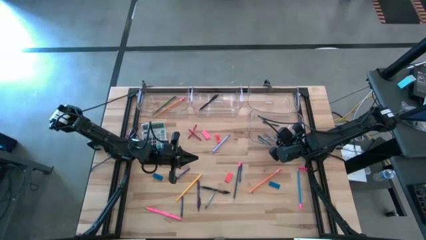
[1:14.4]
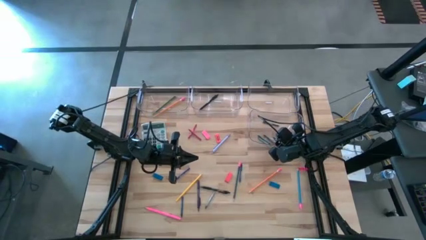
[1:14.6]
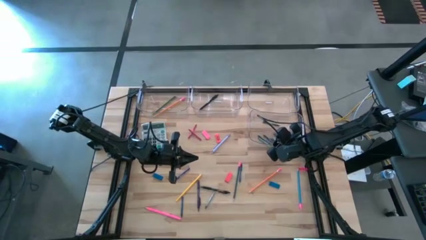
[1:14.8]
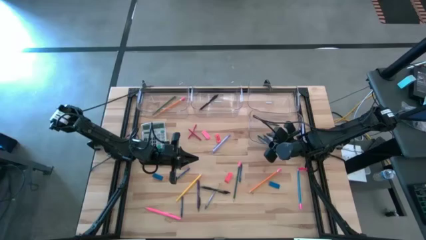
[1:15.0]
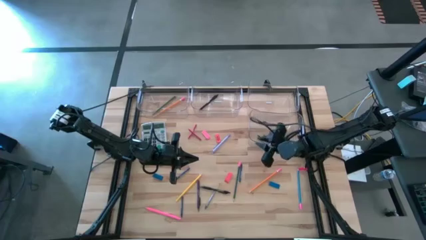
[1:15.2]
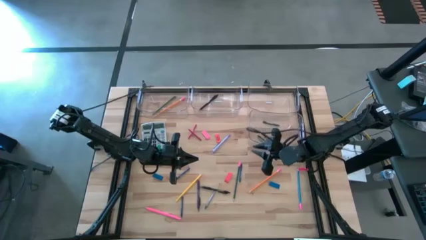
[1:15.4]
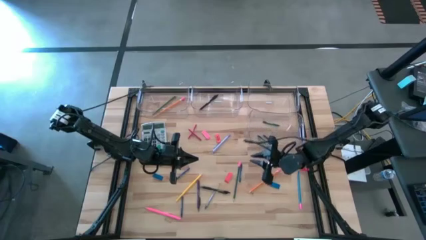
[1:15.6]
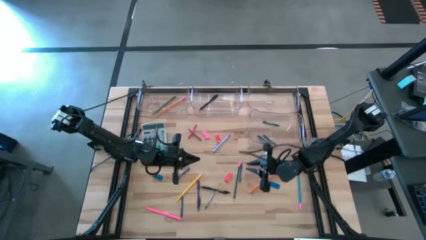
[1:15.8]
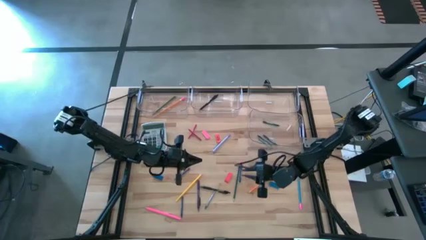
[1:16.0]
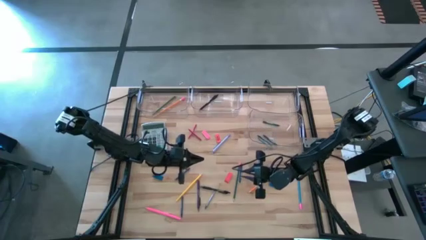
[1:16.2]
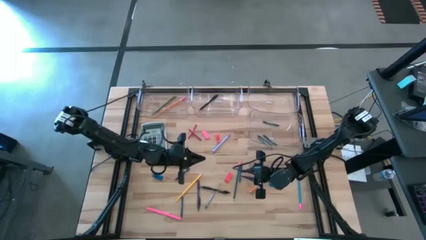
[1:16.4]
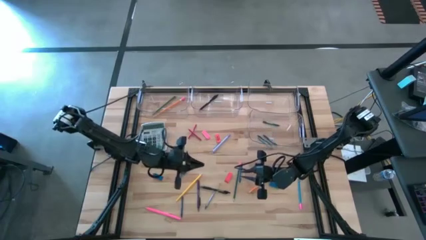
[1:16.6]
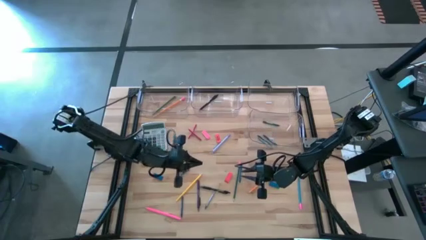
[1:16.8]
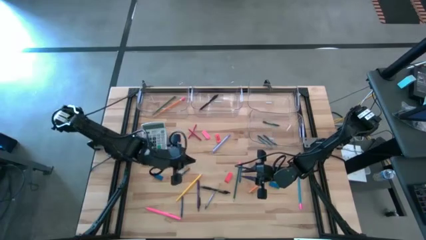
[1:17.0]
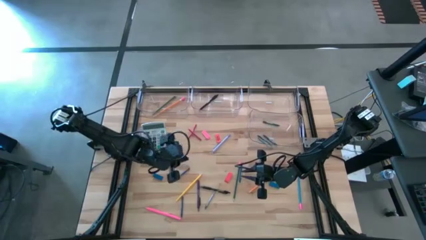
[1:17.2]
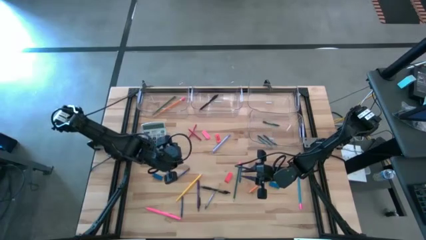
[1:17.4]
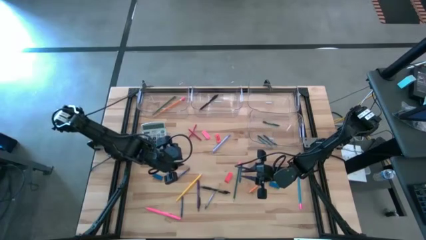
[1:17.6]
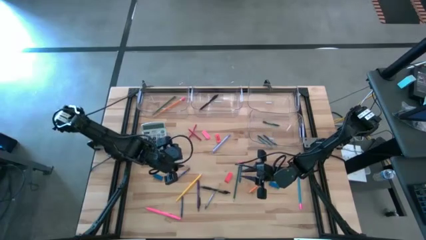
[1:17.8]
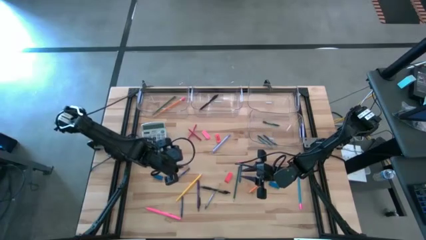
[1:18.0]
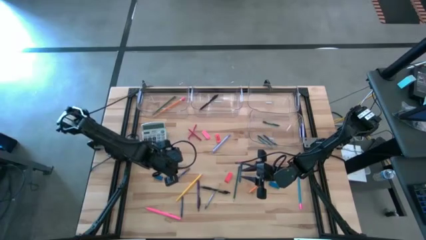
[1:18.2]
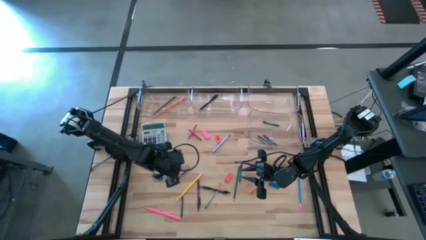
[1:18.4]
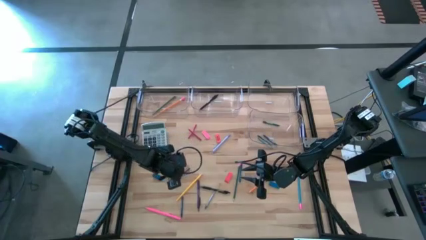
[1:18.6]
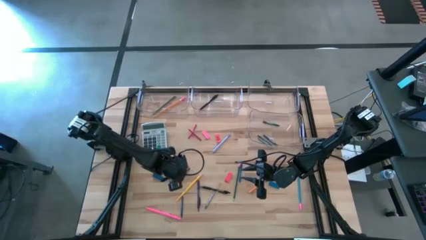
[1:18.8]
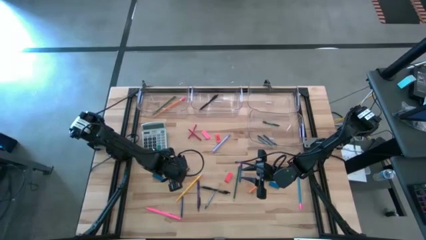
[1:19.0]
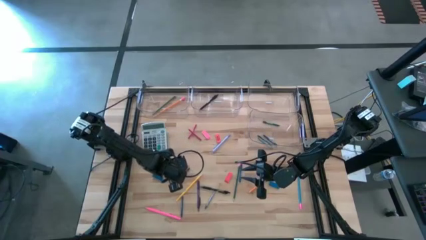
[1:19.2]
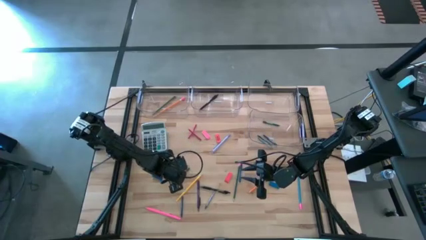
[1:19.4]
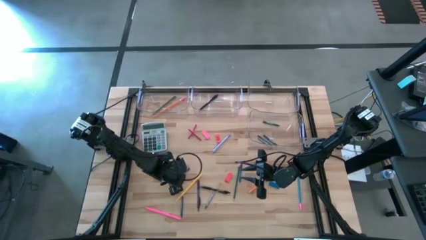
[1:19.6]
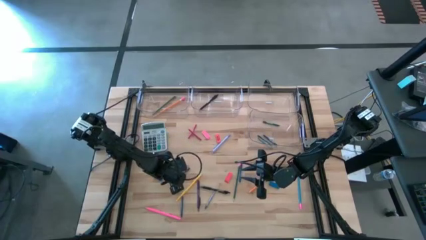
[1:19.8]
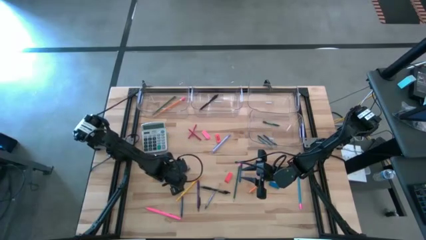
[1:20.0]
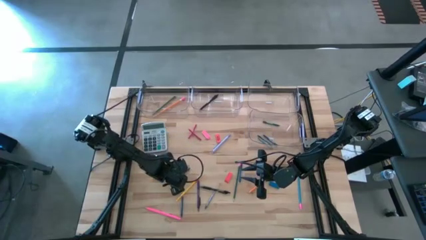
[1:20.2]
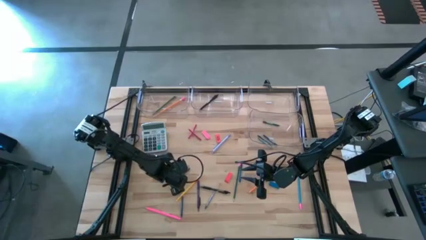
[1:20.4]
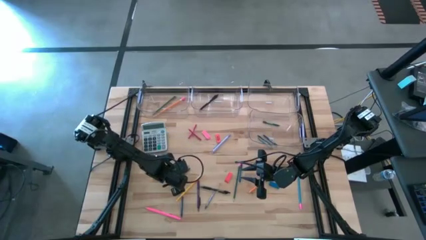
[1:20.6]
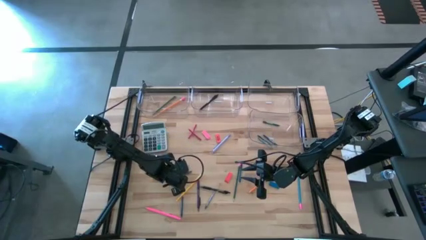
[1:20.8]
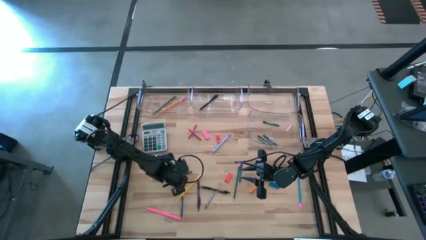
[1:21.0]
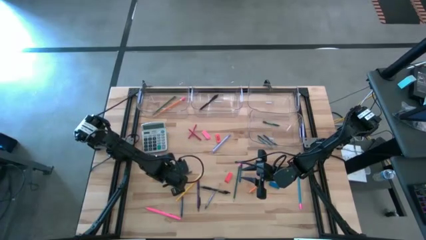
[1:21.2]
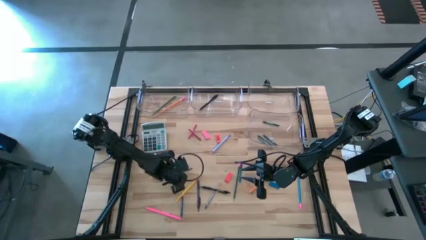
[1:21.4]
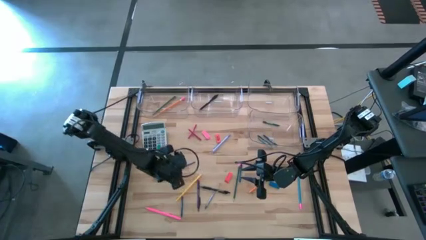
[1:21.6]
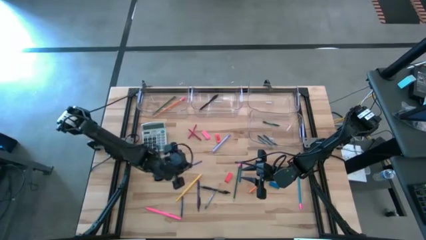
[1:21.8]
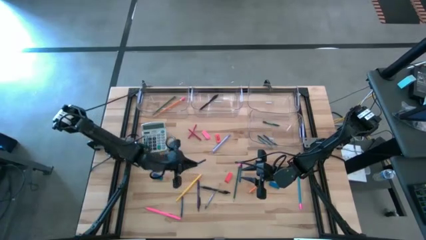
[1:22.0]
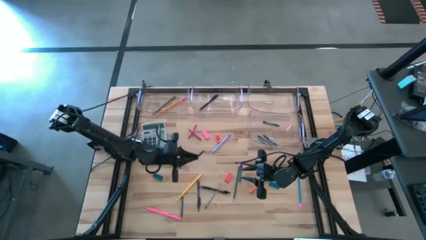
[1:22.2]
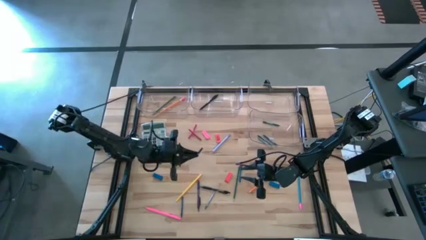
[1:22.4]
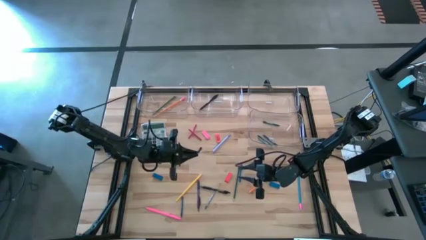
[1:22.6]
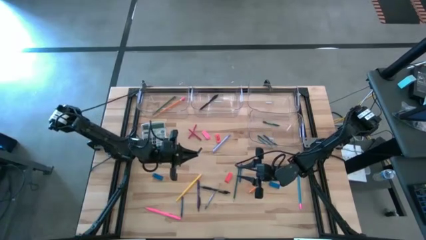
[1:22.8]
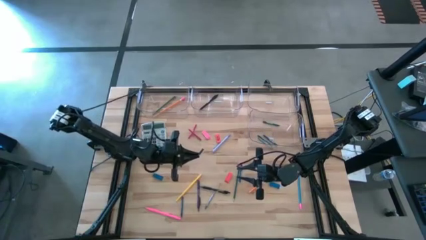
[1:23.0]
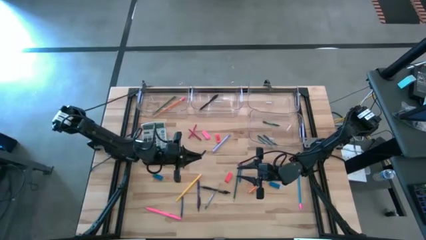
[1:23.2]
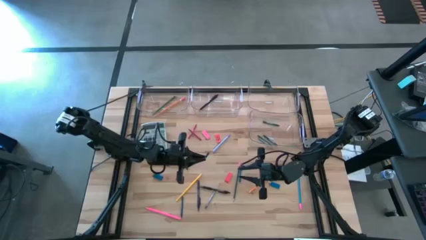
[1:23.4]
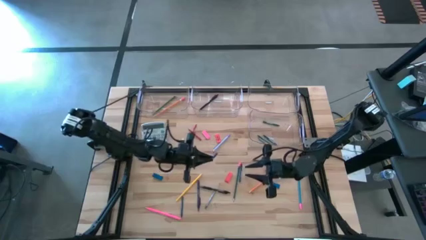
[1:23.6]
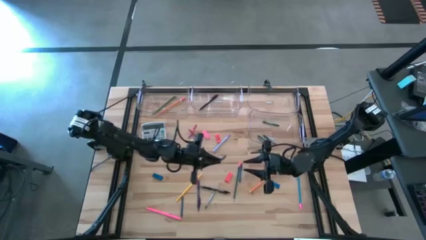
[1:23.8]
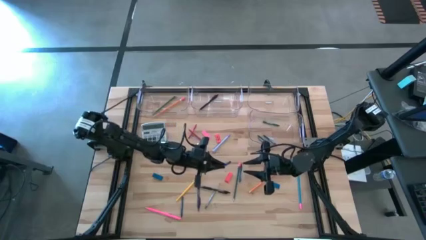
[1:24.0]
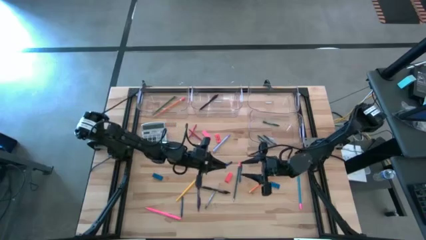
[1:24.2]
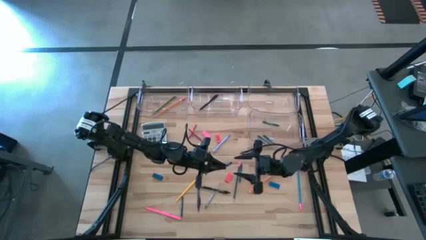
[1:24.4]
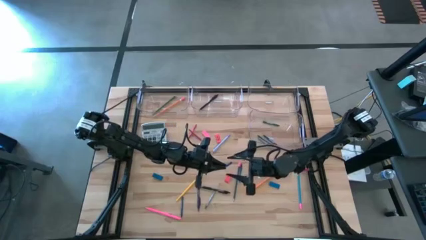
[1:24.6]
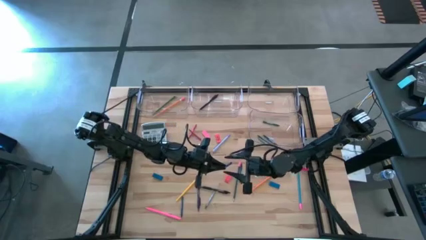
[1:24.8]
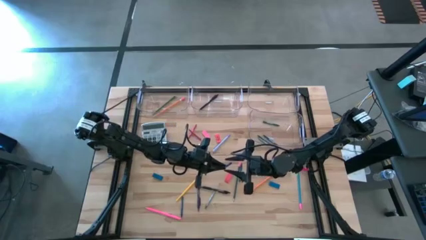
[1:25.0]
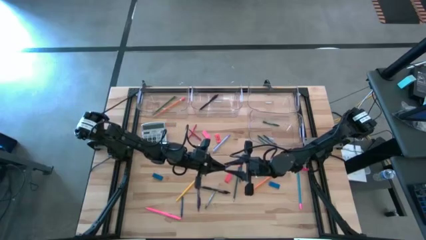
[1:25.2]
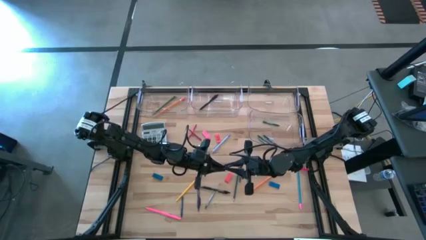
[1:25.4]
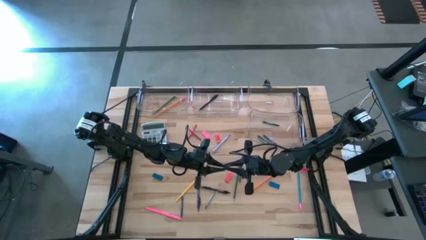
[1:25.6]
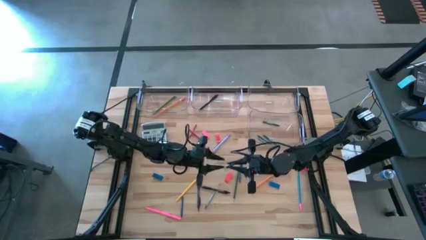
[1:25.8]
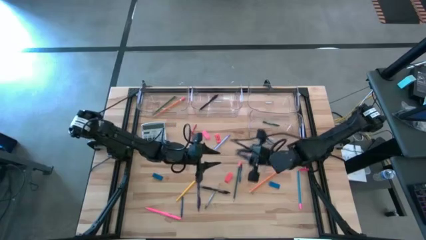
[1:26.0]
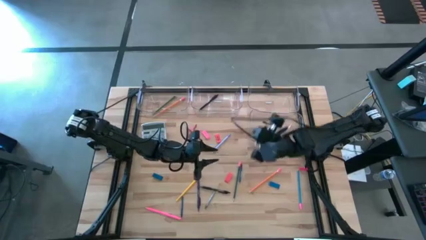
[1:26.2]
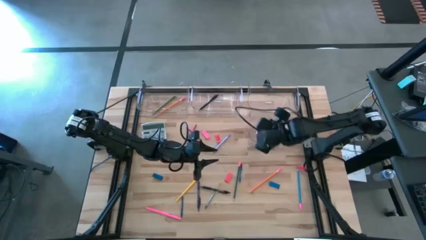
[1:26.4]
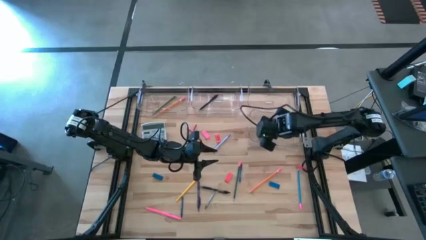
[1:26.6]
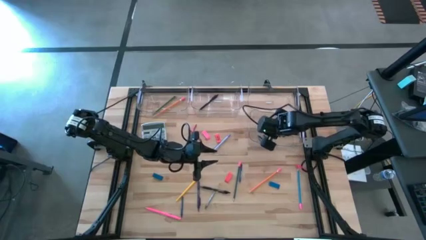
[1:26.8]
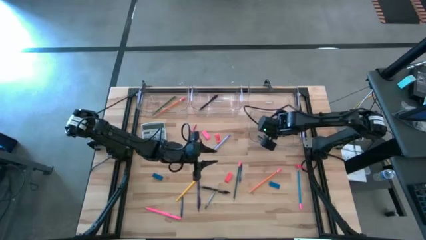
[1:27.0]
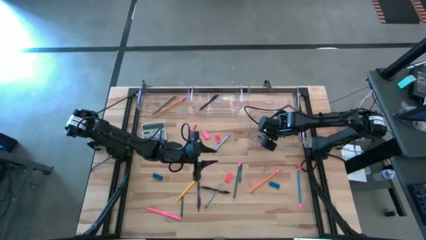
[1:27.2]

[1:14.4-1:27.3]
Task: Sort crayons/erasers/pens/pencils in bins
Put the blue crayon into the bottom transparent bin

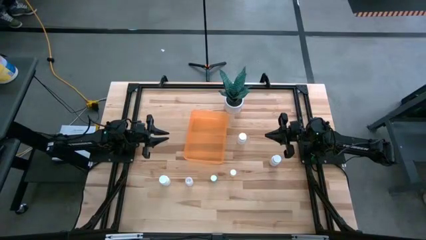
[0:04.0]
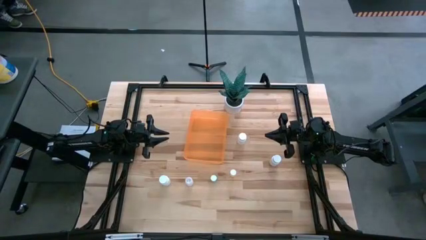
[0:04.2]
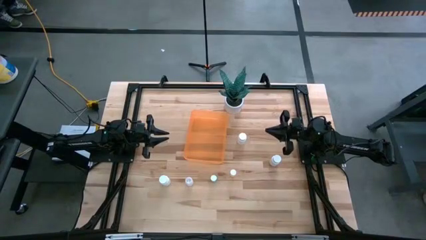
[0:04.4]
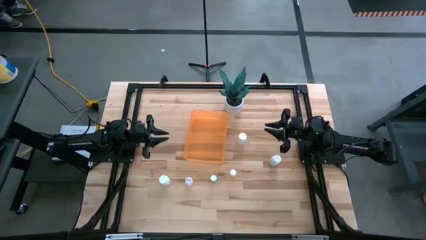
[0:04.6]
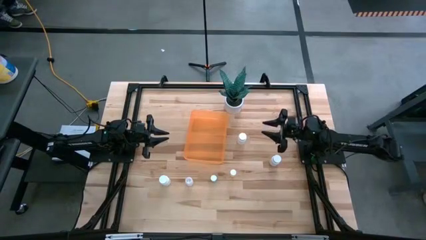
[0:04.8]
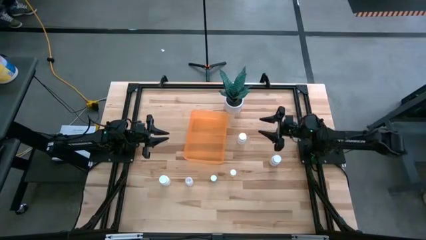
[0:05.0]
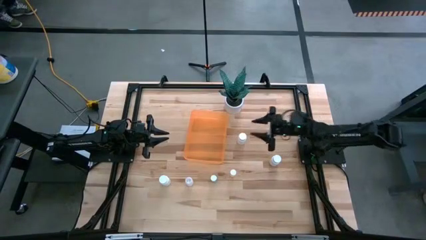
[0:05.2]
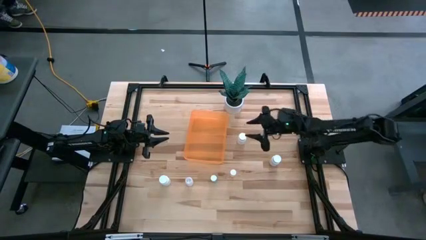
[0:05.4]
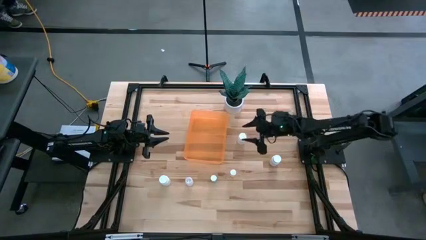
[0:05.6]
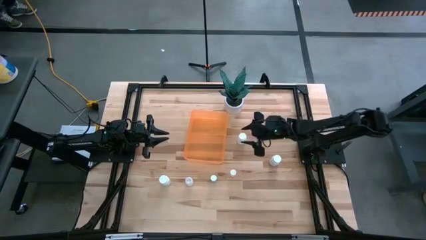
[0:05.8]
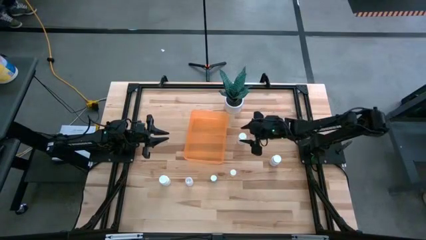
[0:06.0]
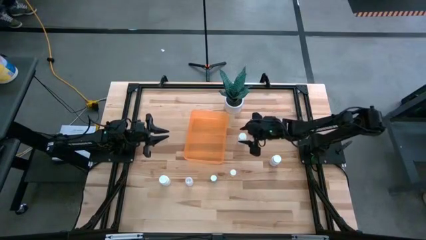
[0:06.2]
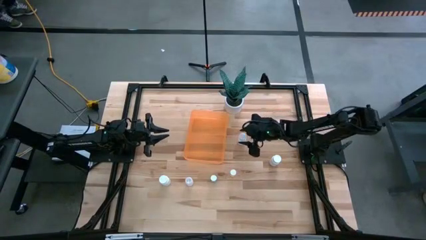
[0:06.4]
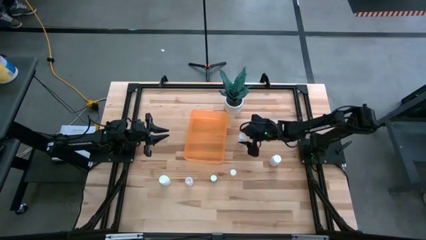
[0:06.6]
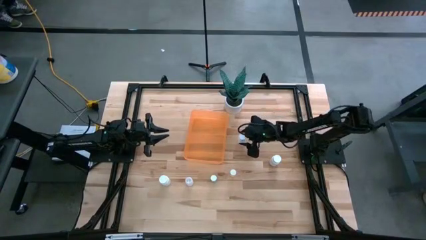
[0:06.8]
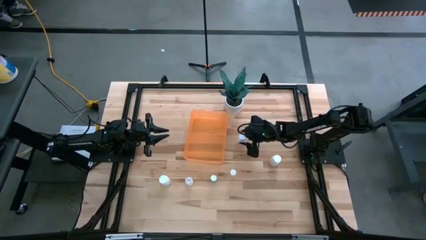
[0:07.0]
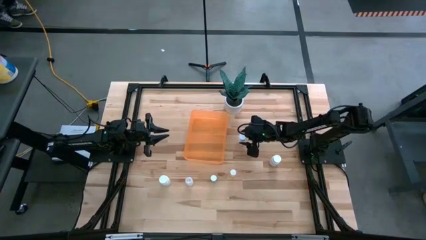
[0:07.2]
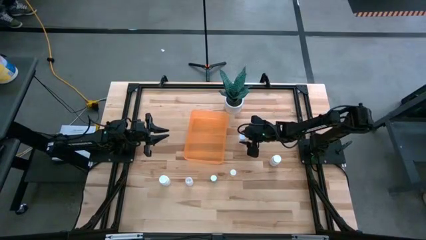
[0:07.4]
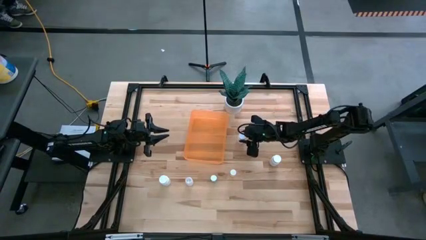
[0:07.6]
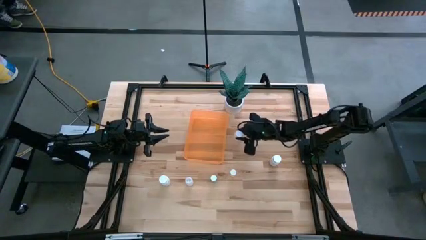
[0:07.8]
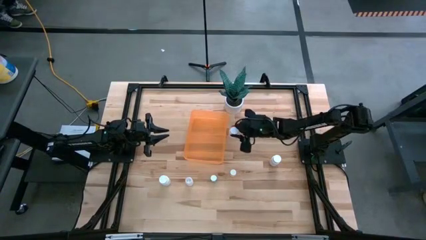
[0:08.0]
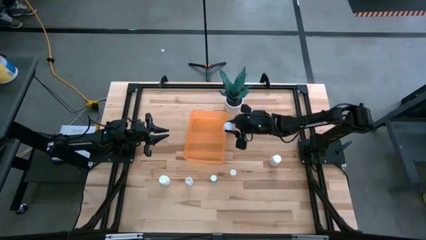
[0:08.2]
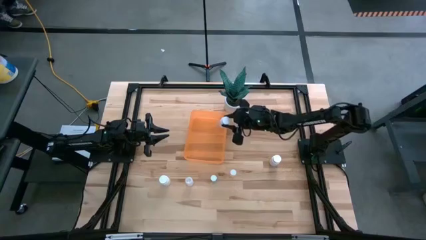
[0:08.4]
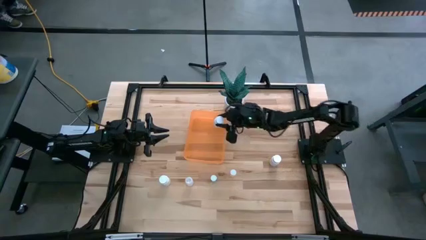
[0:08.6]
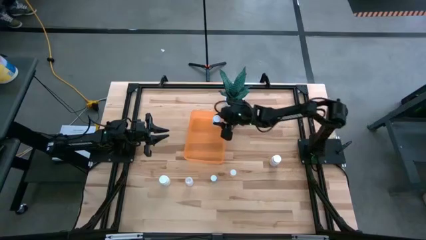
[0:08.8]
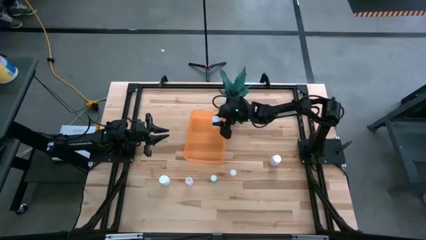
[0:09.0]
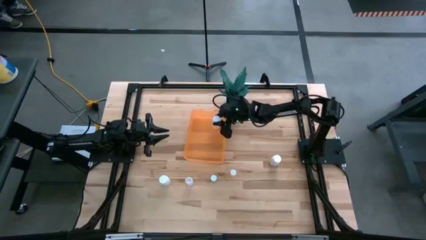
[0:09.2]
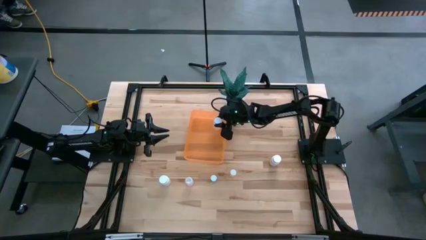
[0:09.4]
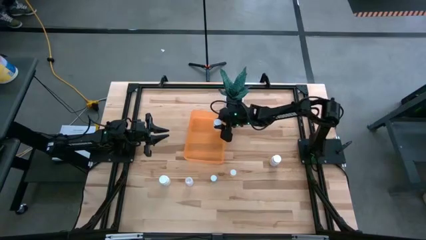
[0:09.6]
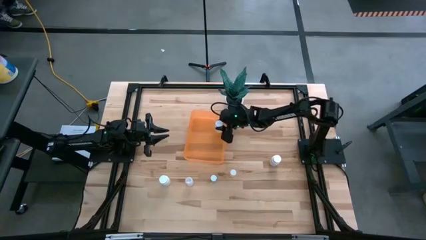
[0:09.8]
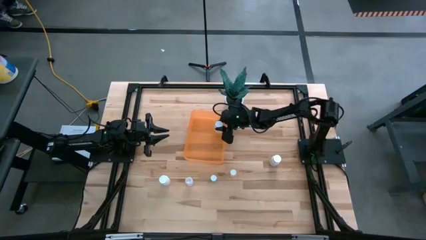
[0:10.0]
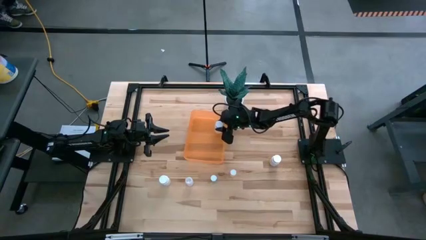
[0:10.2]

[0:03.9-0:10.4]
Task: Pick and place pill bottles into a basket
Put the top middle white pill bottle into the orange bin
